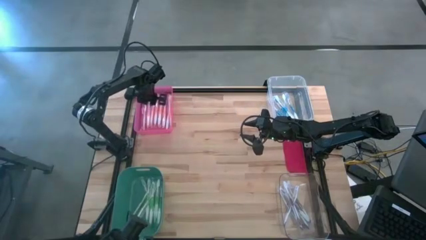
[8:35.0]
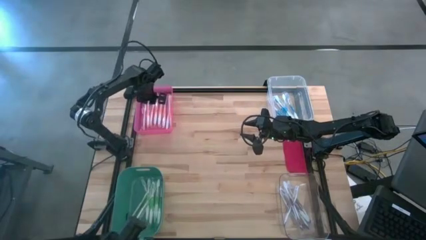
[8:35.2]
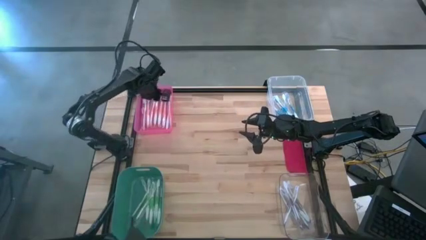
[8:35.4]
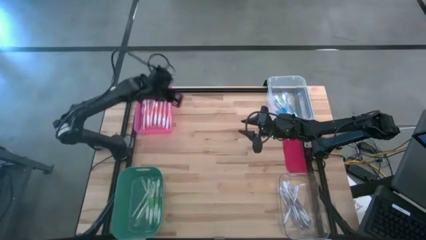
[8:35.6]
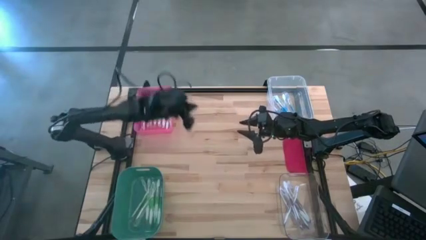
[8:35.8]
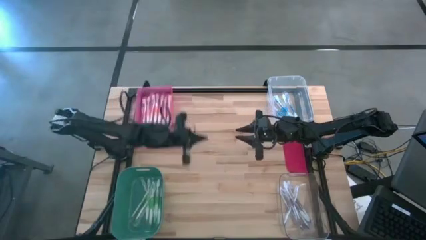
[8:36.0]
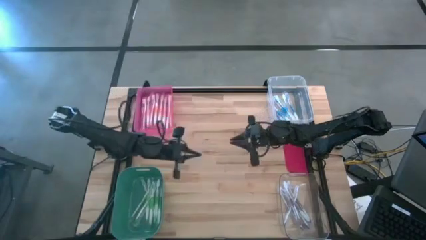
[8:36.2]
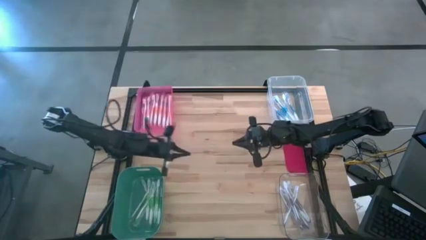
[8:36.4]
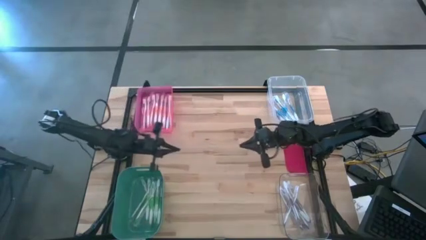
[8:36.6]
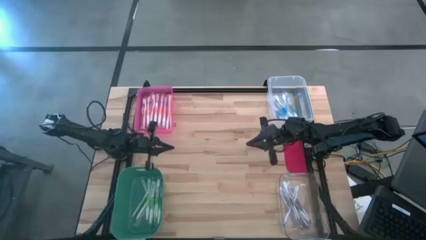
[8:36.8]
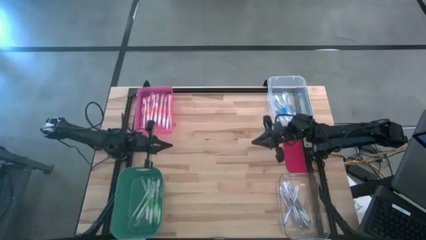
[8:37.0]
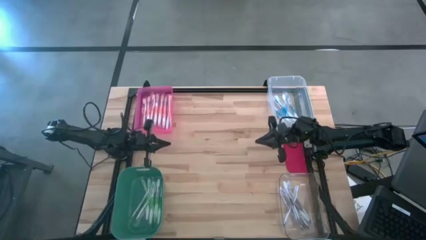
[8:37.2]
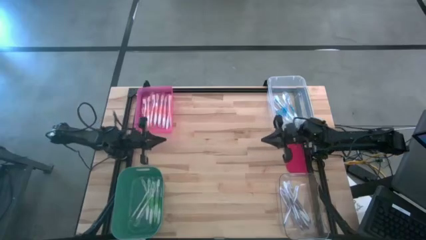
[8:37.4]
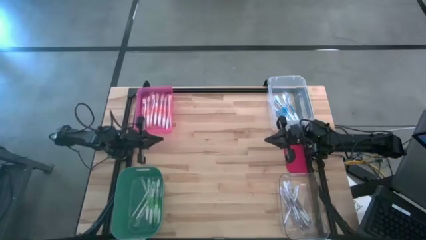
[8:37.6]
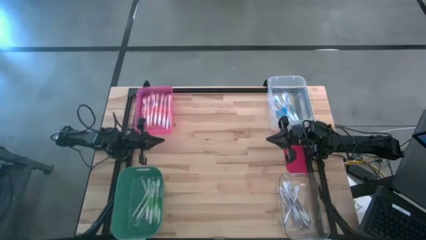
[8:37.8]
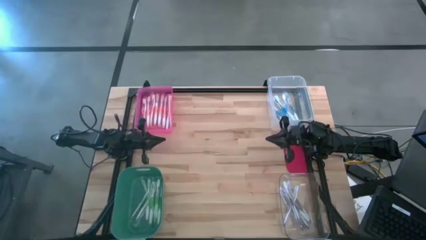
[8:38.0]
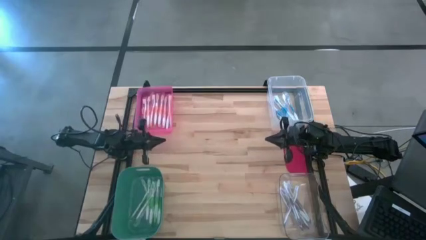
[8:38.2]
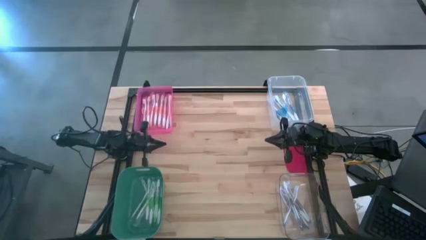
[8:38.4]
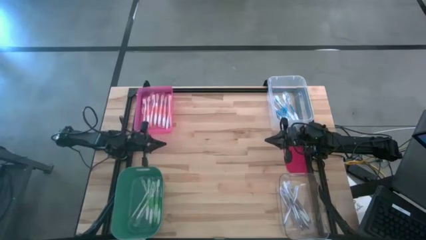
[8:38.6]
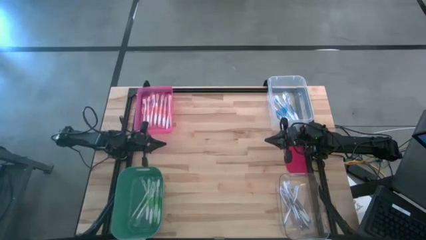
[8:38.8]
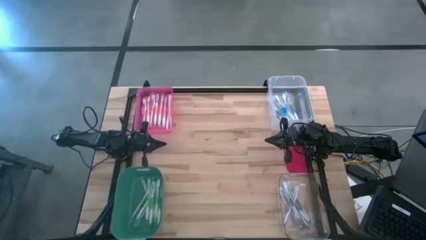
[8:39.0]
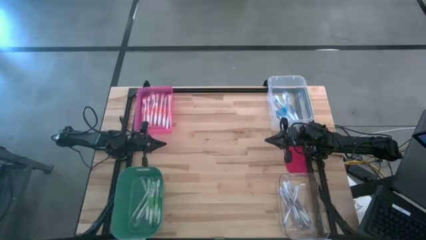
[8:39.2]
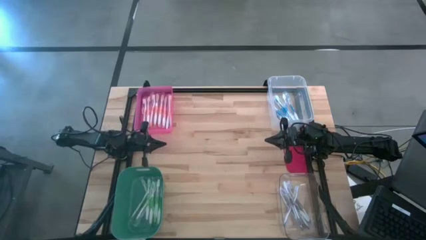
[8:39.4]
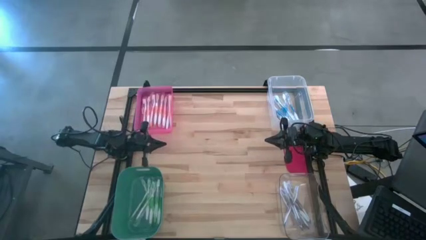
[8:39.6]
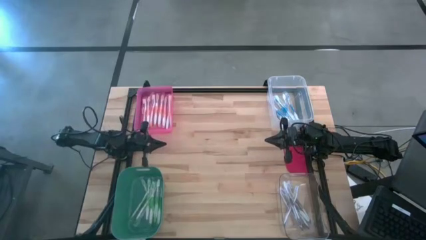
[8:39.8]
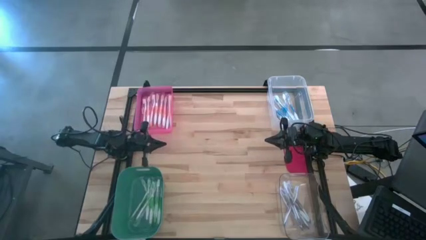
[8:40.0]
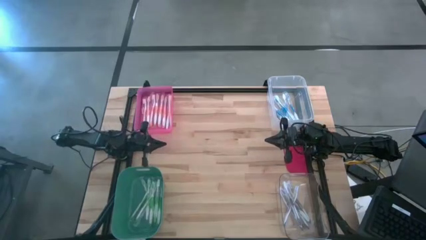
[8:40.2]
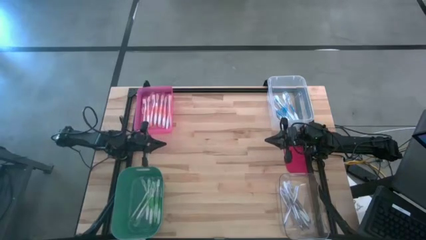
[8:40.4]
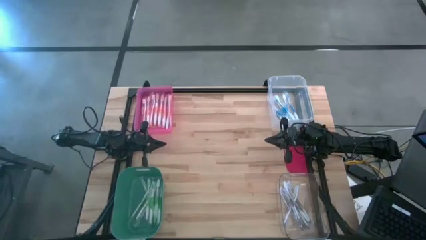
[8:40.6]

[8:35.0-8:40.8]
Task: Pick & Place Toothbrushes
Return to Home Position

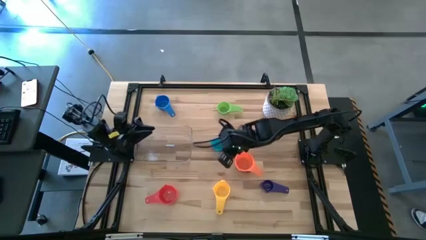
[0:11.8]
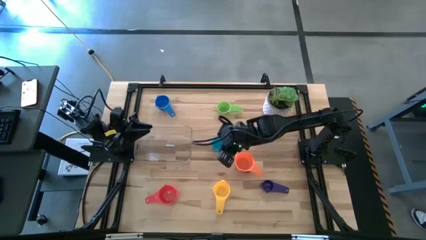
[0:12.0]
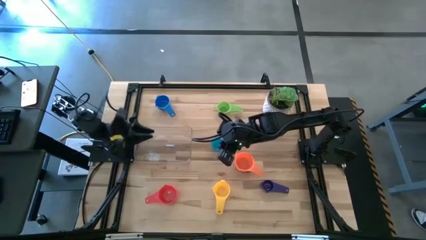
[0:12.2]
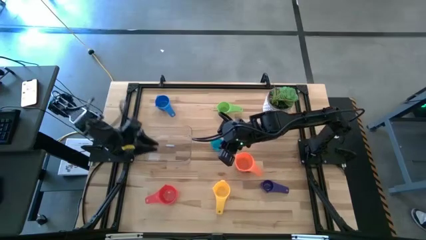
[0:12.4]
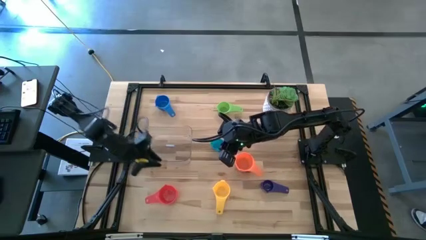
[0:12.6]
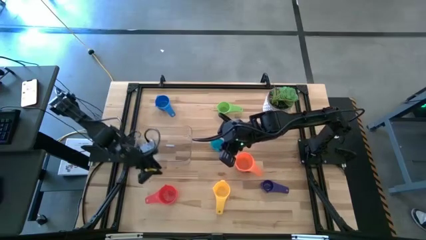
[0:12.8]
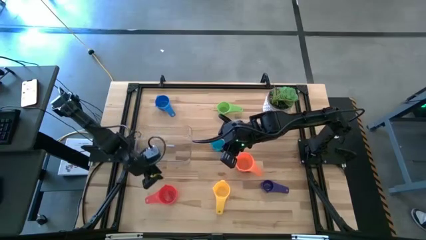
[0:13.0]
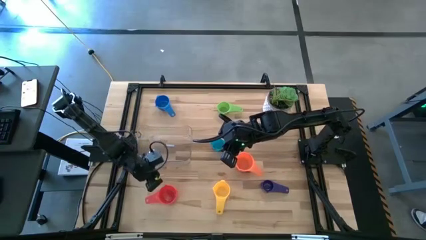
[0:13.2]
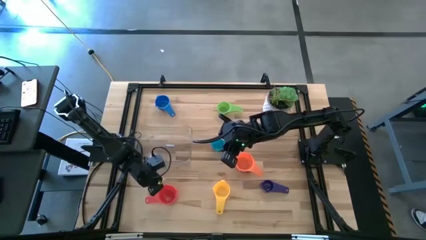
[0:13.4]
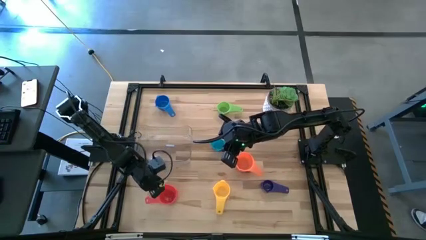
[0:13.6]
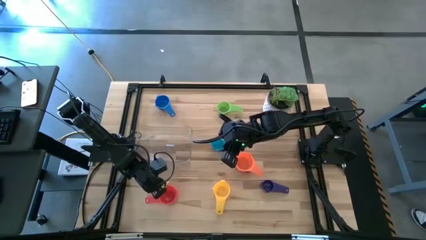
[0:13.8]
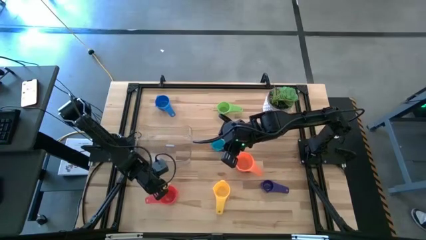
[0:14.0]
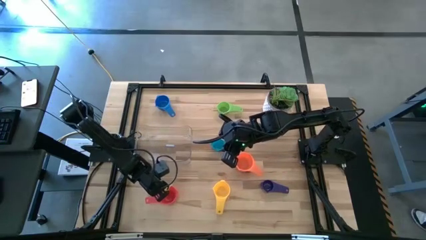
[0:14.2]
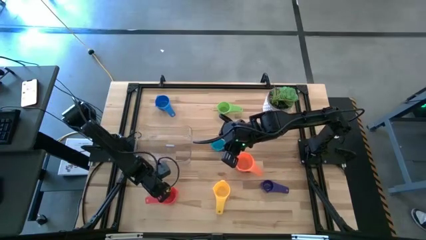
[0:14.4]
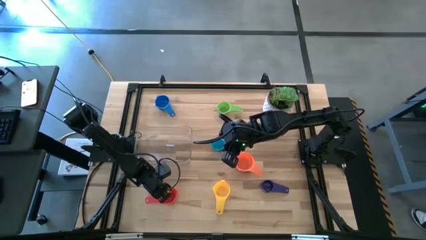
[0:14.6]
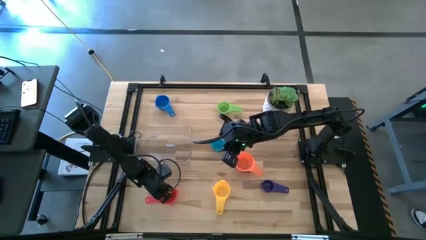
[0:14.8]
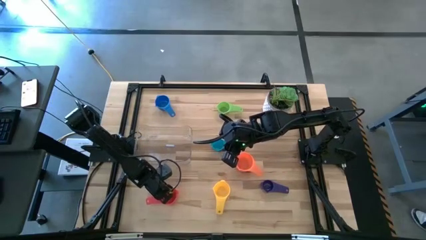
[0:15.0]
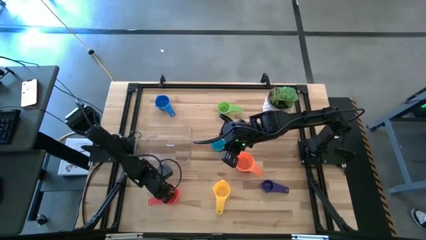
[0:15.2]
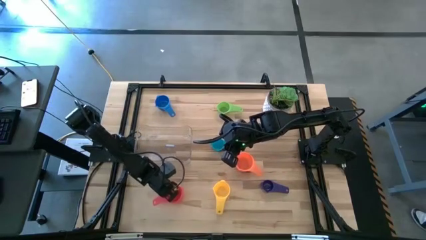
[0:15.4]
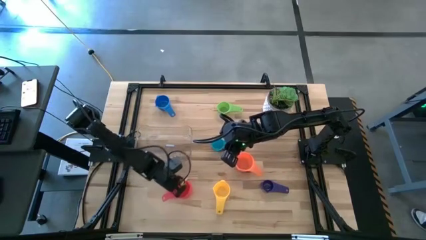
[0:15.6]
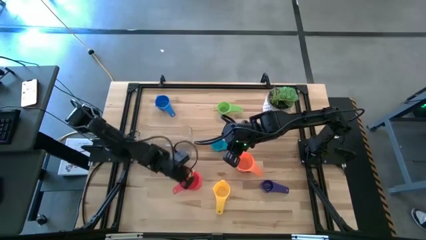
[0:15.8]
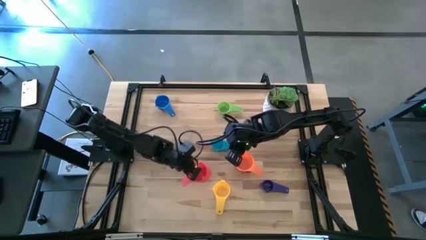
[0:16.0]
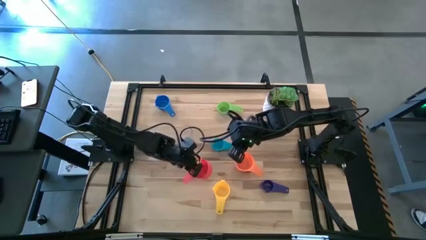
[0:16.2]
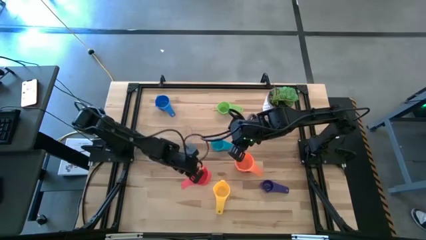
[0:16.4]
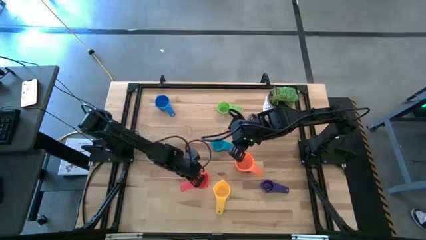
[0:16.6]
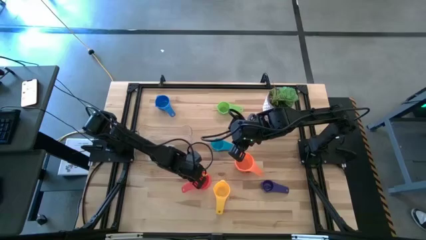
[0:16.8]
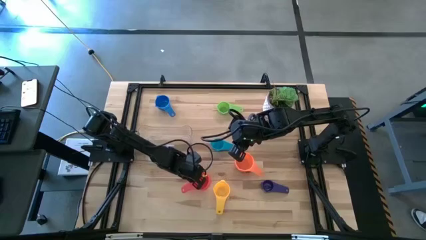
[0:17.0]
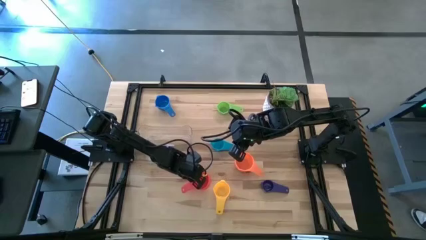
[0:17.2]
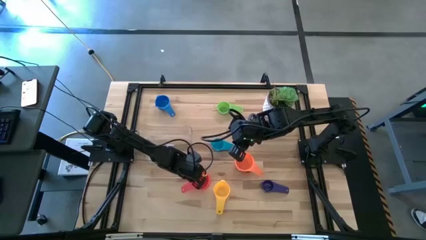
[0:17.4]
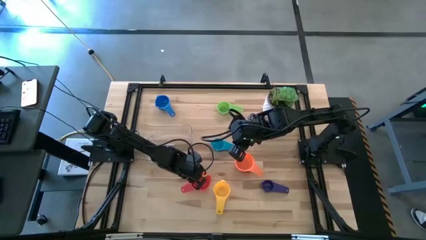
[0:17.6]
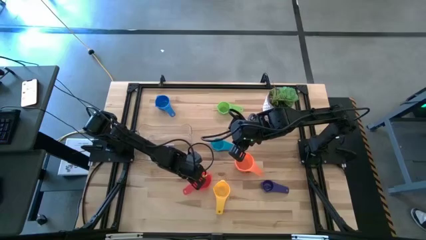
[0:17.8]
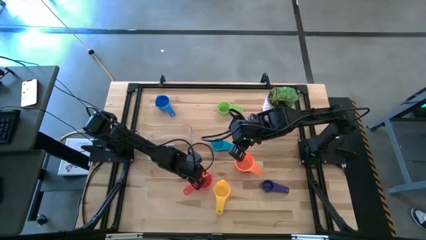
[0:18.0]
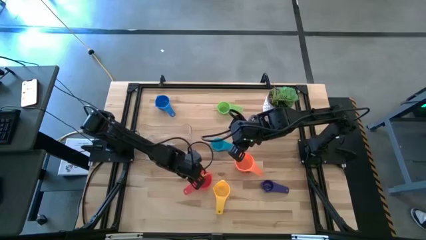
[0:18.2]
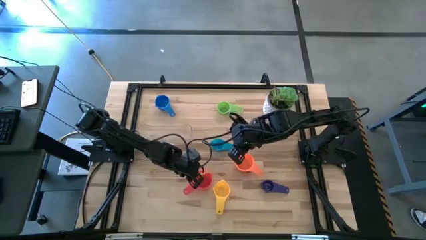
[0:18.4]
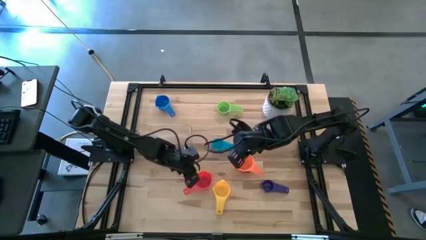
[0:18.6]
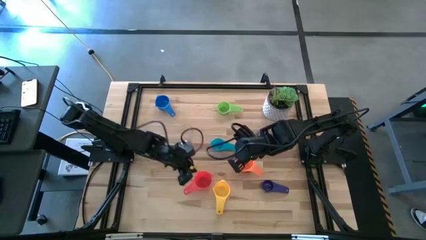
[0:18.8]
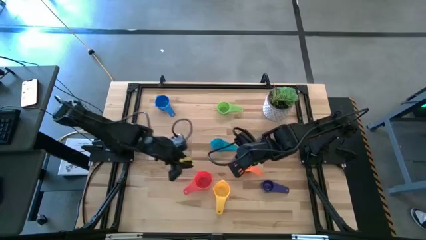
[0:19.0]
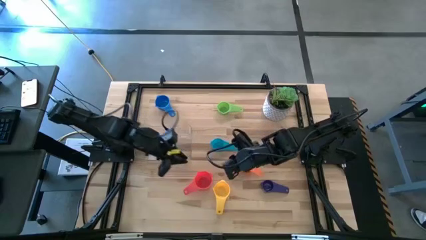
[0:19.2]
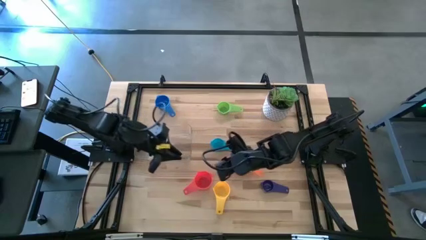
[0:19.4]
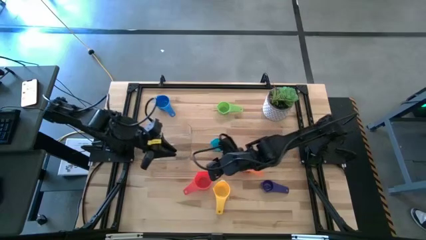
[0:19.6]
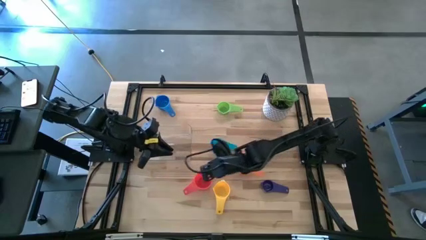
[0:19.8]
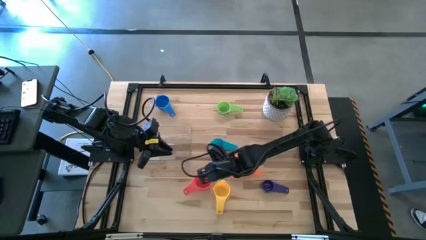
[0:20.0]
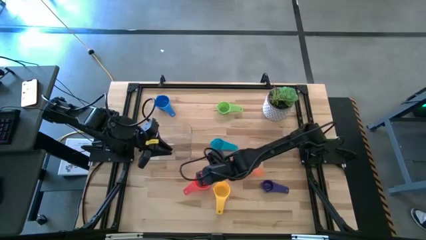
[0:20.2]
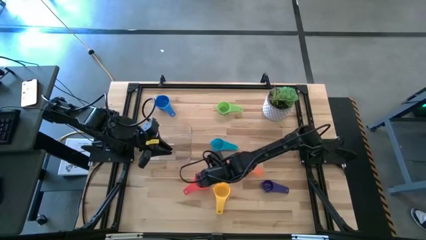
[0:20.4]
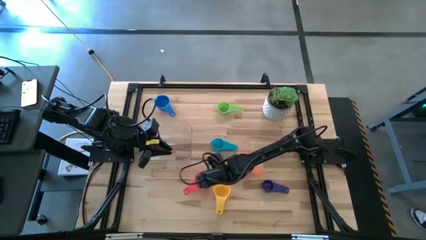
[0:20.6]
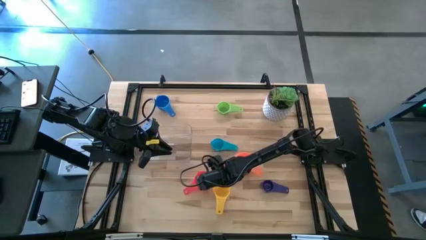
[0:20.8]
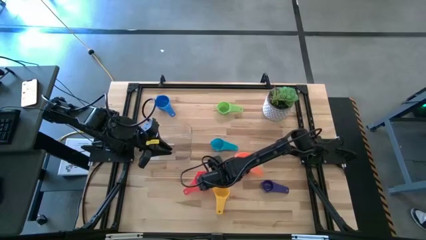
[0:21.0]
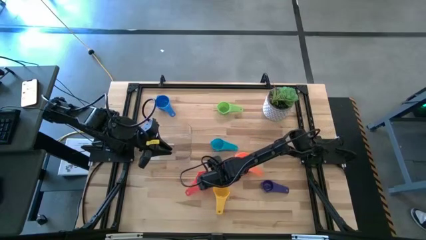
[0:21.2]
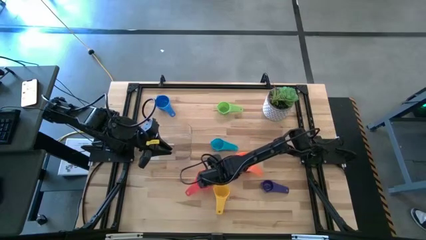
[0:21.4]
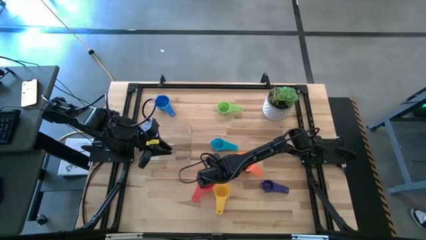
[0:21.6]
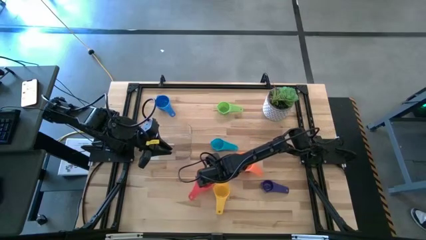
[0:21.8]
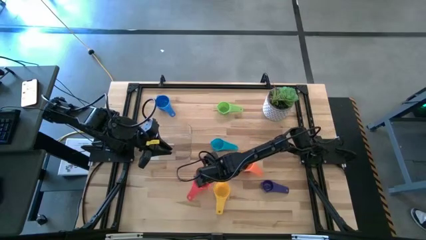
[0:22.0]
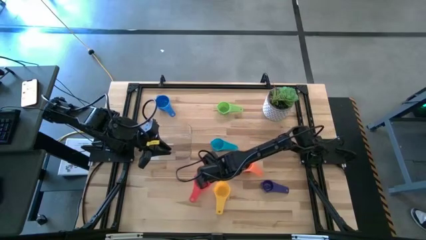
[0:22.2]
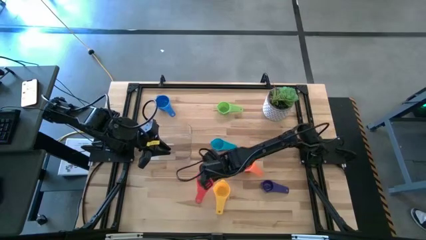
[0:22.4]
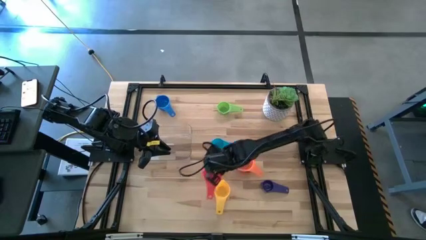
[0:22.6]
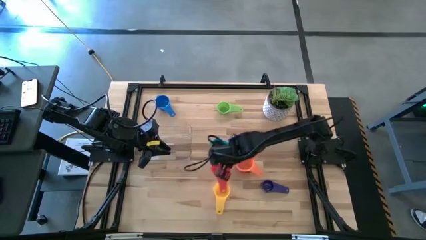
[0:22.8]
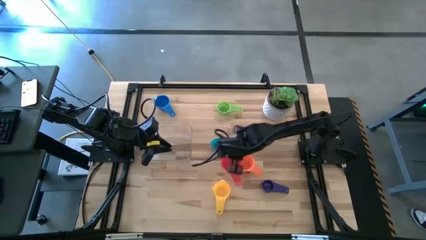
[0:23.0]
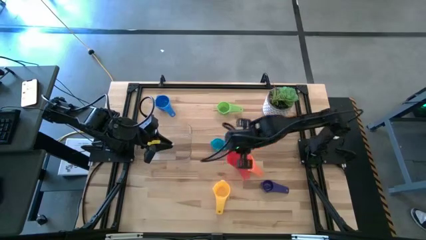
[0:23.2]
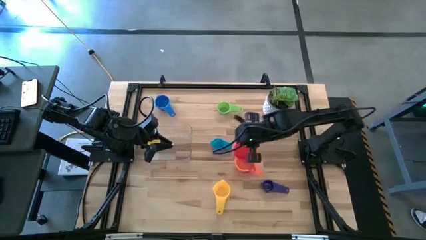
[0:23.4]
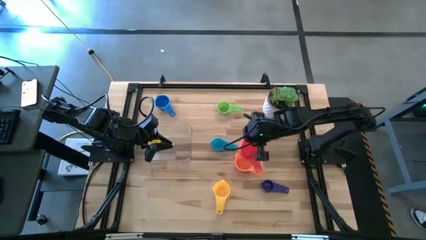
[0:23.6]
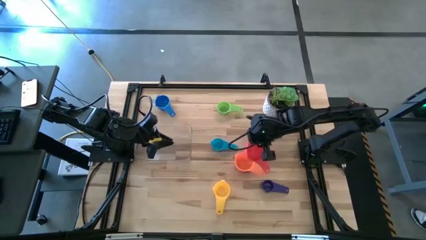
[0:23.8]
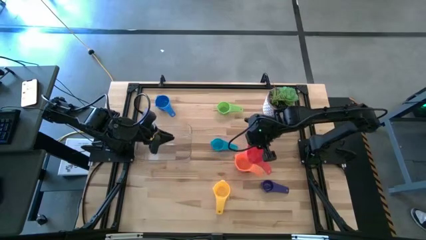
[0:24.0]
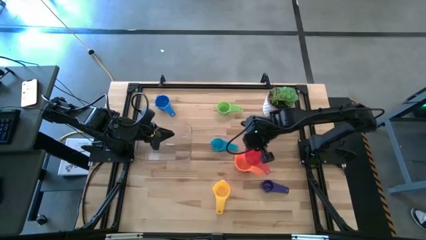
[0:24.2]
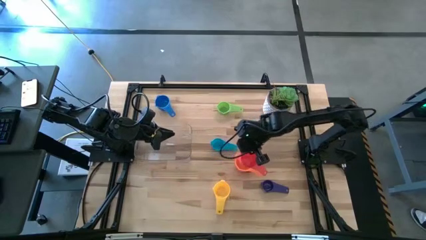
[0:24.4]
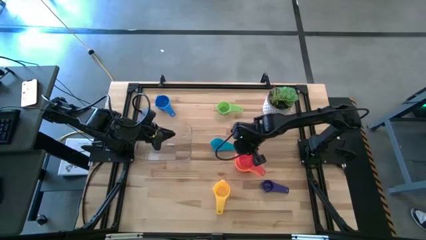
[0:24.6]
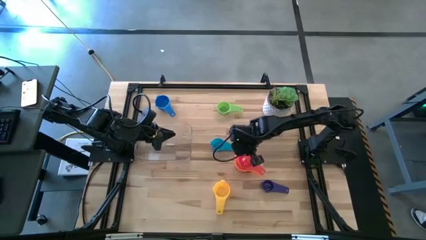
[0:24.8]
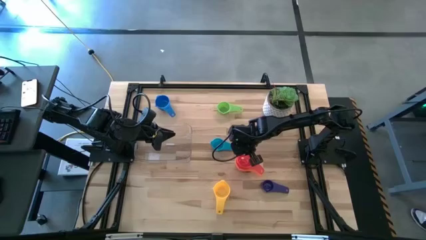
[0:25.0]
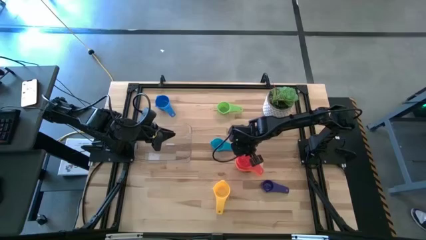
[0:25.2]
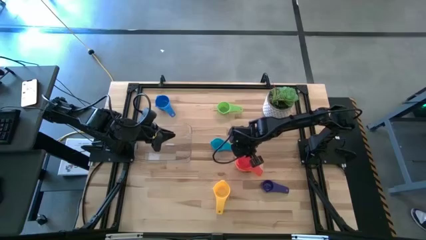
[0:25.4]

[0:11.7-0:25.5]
Task: Nest measuring cups in basket
Stack the red measuring cup into the orange measuring cup
